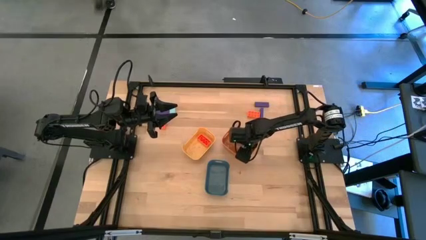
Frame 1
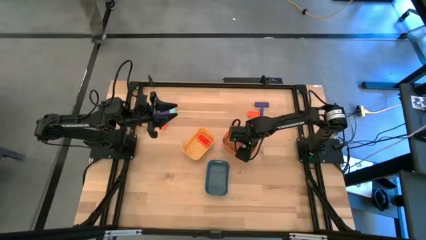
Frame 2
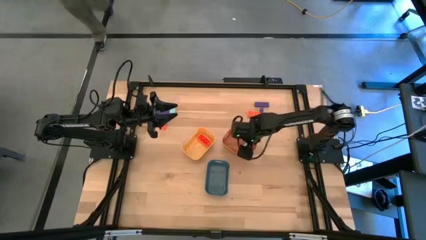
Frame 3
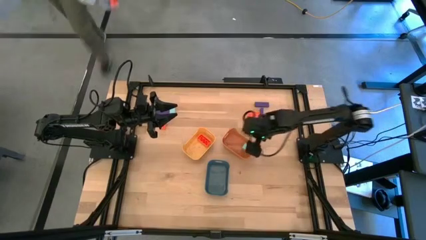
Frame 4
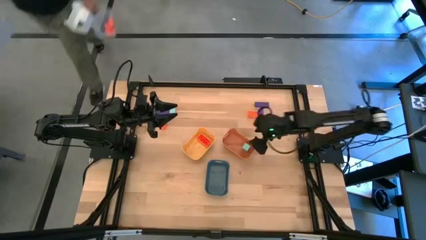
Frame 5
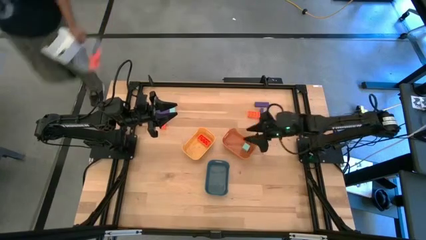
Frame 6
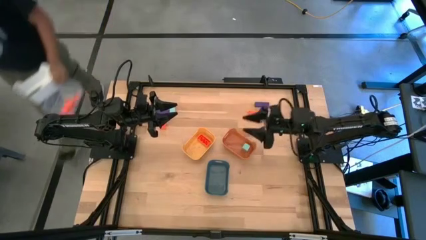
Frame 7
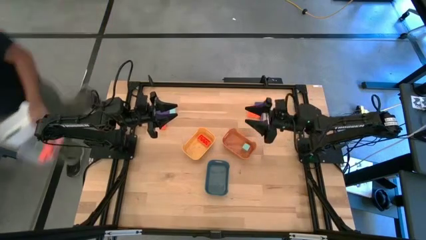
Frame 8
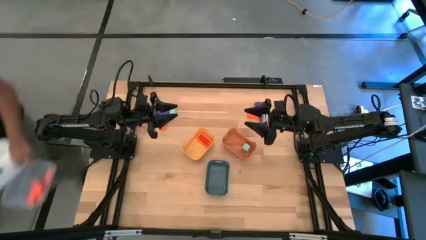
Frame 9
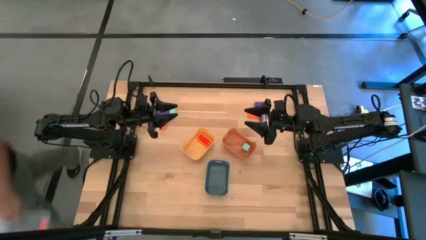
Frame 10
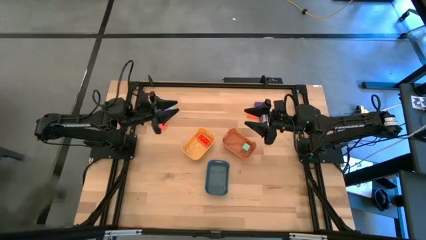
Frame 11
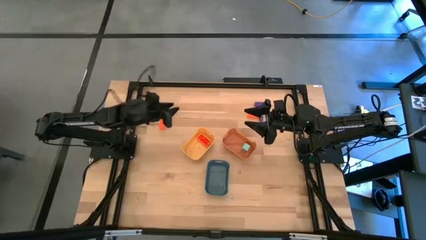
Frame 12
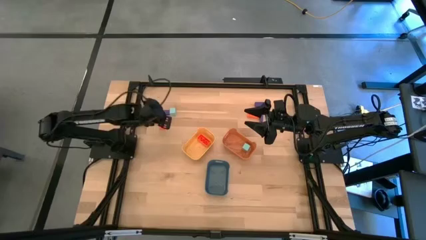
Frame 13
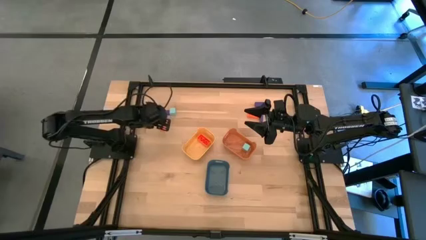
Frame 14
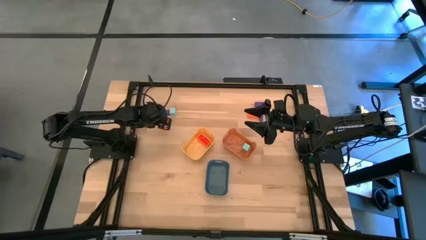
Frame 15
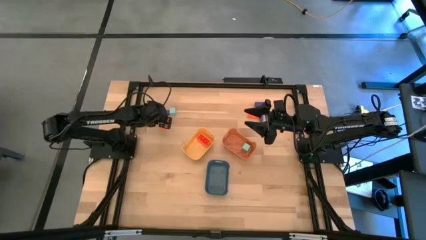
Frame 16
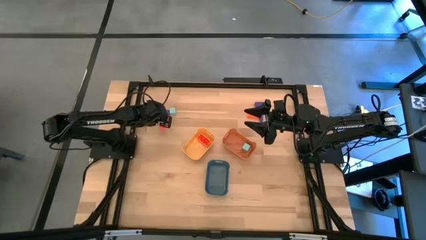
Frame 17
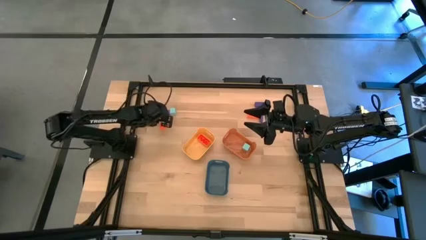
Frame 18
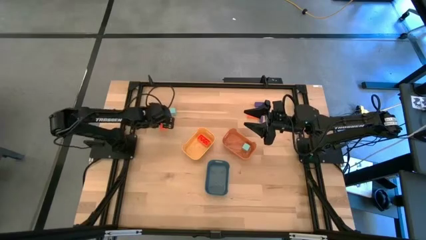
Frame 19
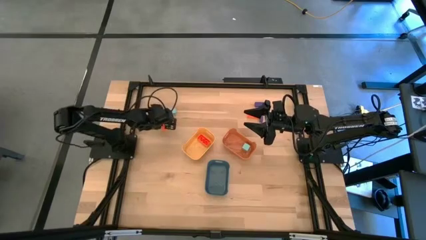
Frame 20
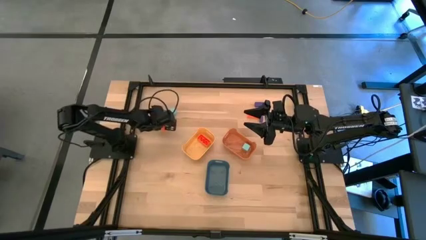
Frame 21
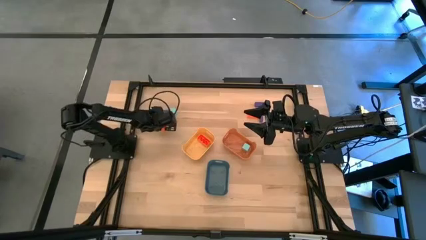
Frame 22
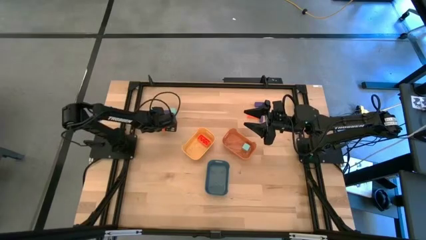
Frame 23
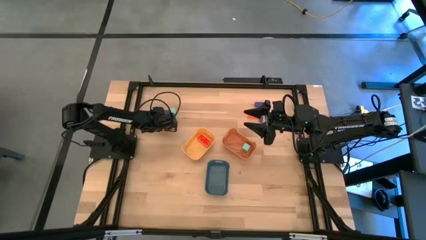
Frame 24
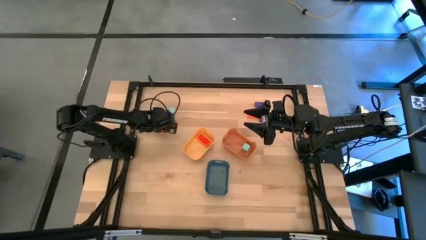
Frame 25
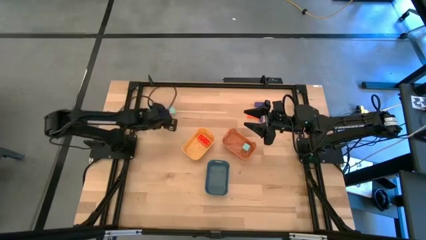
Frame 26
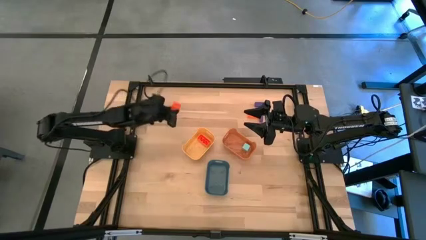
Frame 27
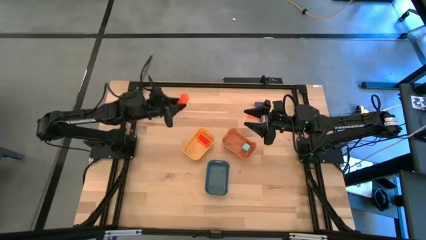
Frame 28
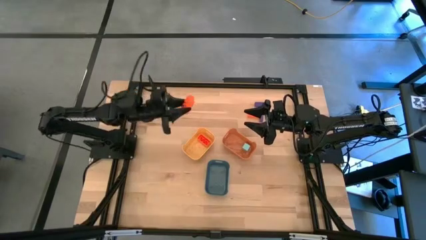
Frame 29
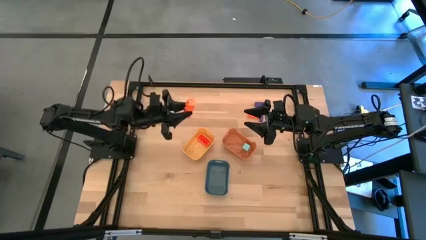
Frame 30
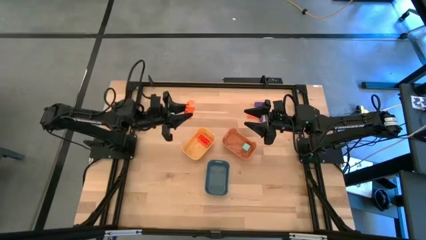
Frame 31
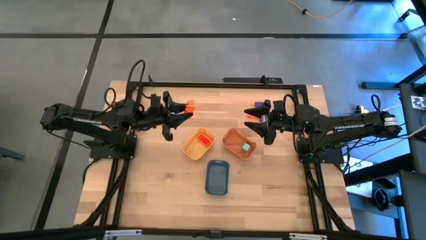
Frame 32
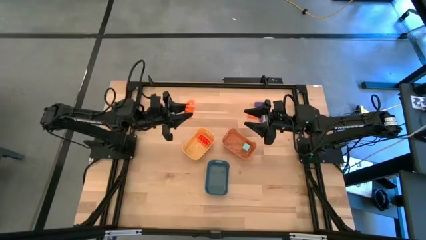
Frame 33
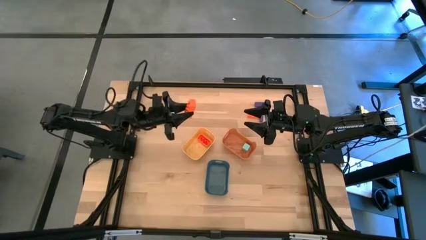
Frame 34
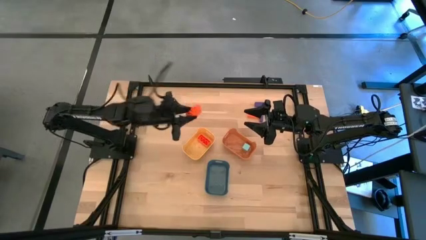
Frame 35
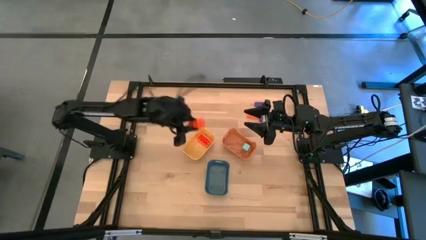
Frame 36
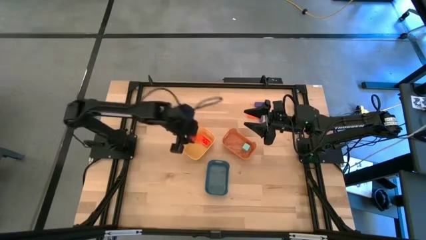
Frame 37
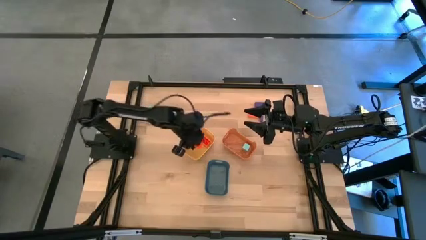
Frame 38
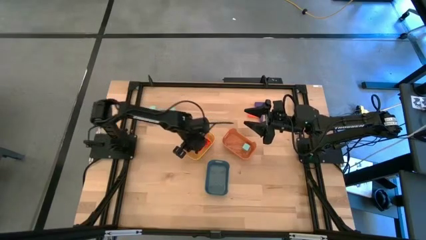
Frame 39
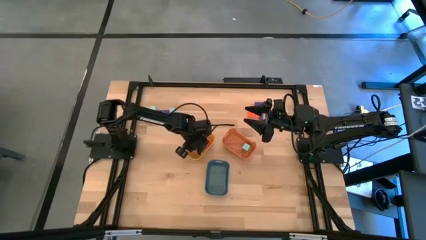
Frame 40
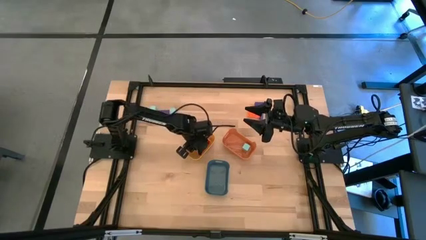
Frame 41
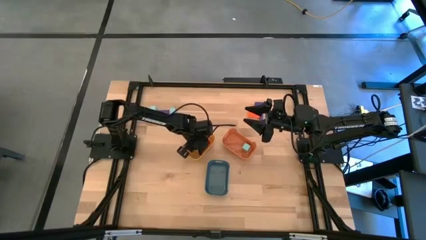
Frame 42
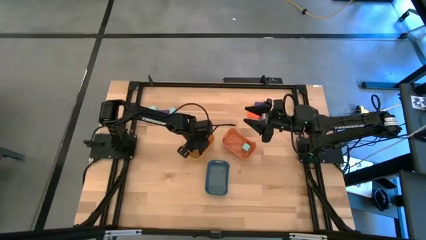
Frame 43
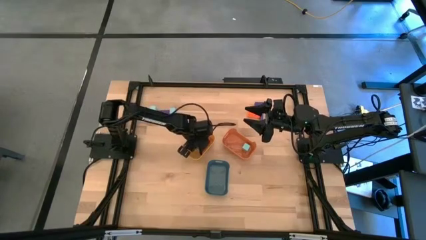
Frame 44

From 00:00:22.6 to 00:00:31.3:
Task: Sort & place blocks by color
Put the left orange studded block into the yellow bin

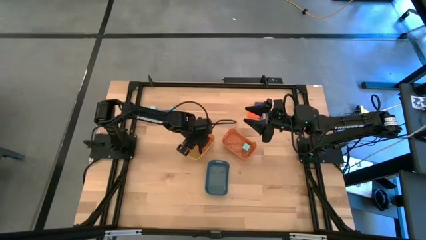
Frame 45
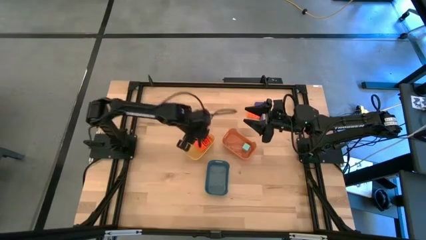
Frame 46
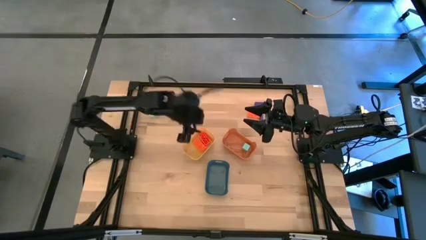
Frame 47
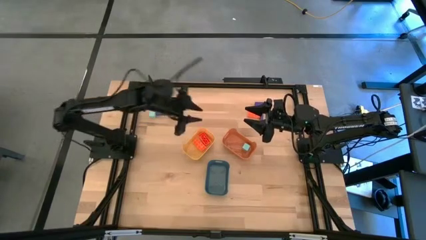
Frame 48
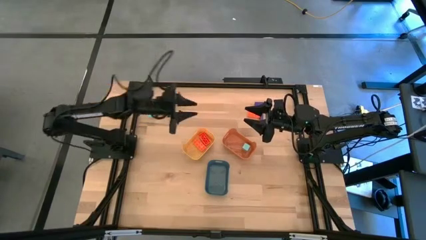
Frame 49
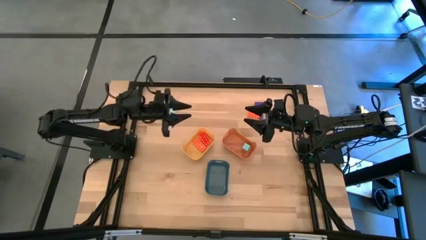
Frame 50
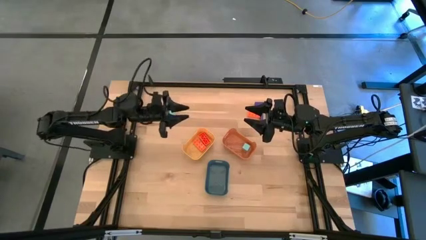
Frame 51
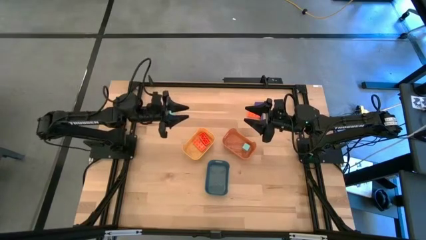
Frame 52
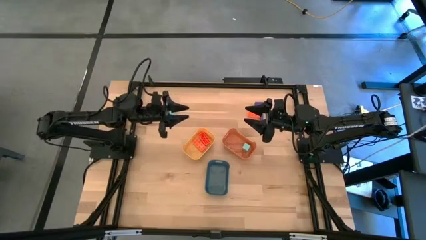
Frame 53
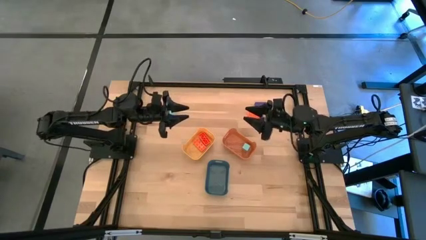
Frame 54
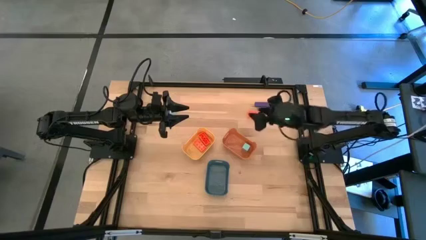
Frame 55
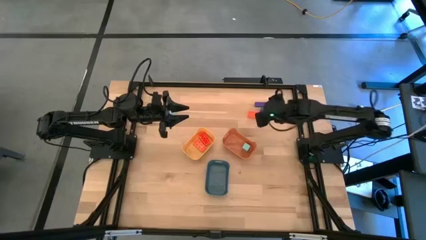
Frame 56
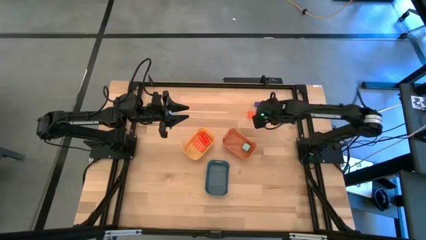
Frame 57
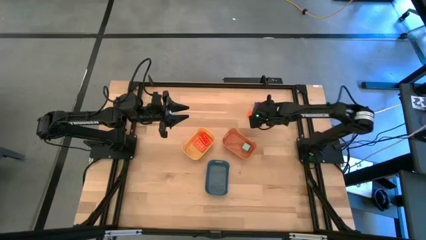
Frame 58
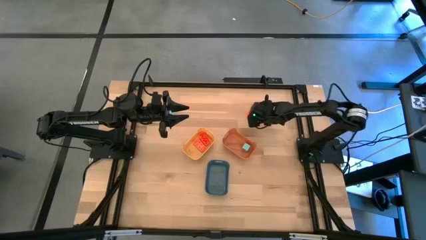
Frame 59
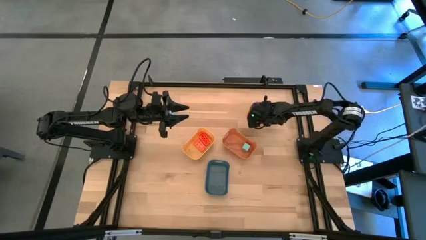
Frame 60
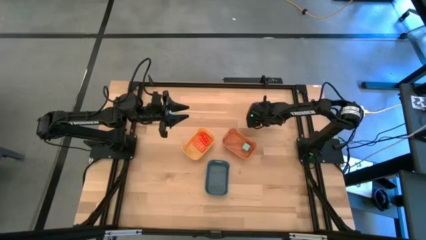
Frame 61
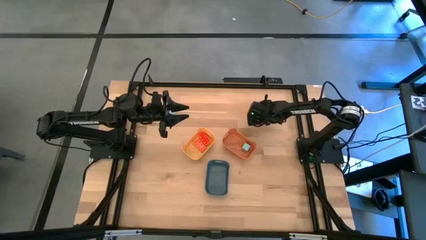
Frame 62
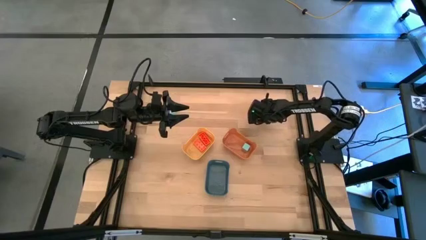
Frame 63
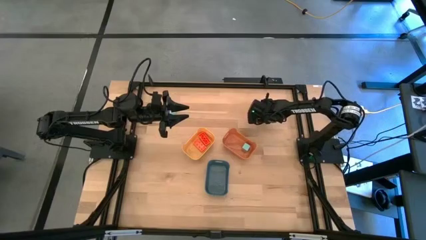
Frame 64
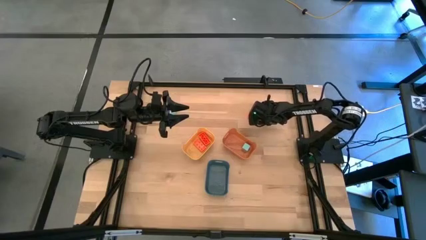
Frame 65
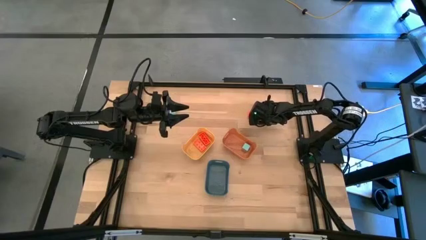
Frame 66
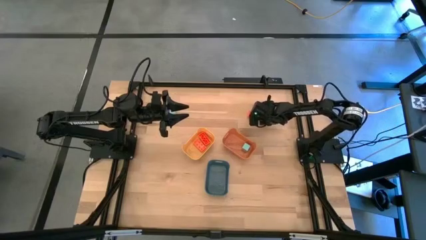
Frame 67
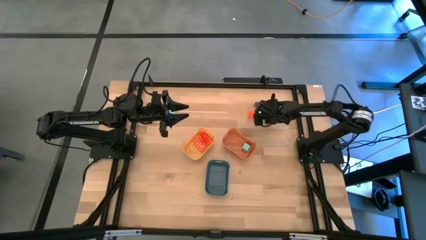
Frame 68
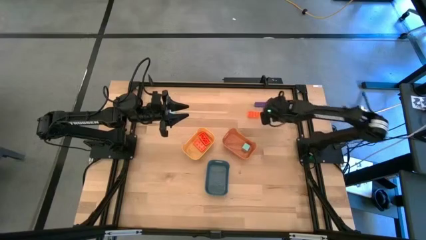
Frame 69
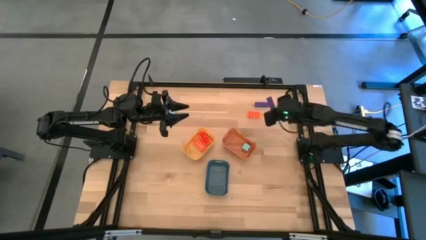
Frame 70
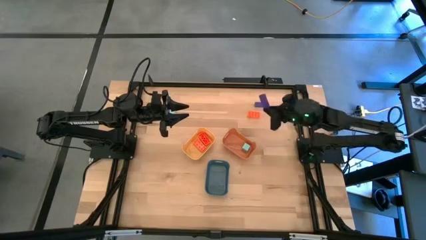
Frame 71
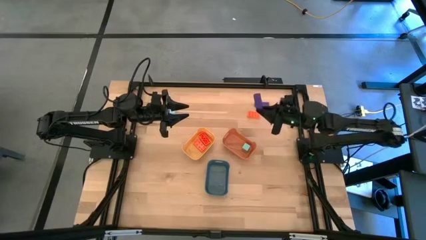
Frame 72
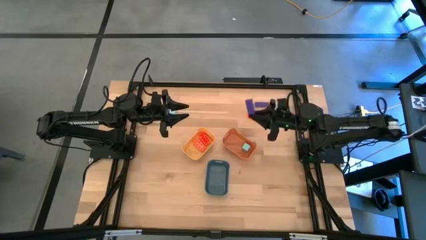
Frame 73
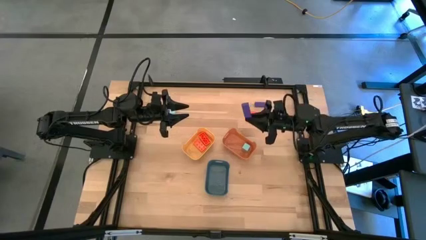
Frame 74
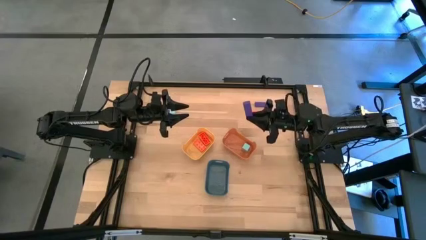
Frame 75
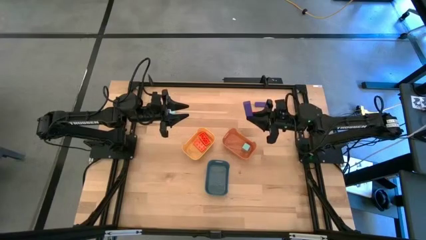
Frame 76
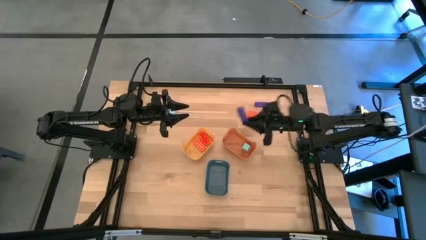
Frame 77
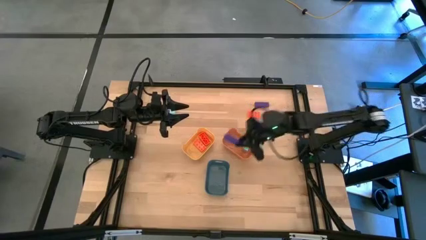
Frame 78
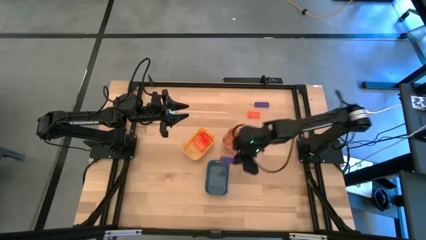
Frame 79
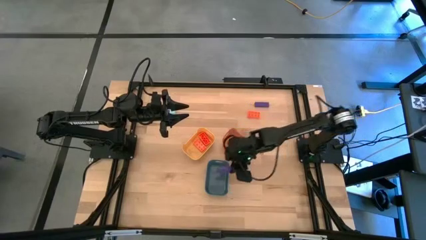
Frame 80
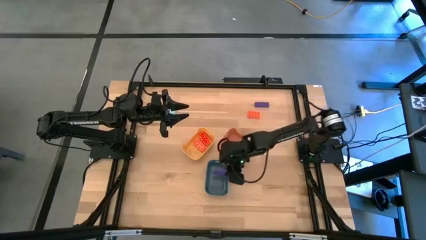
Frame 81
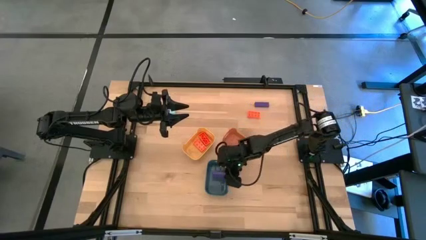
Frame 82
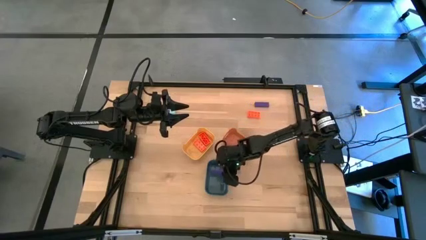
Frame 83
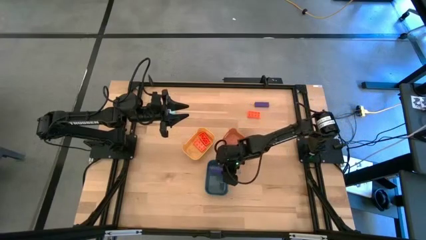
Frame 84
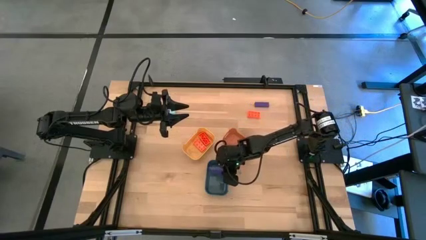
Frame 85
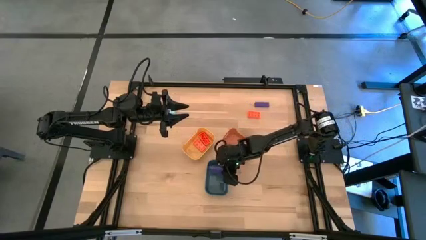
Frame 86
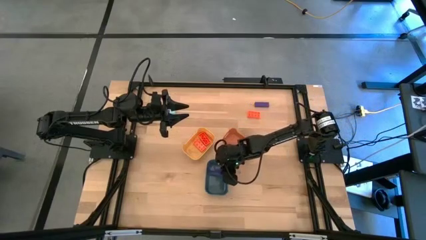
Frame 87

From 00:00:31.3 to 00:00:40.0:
Put the bottom right violet block into the blue bin
